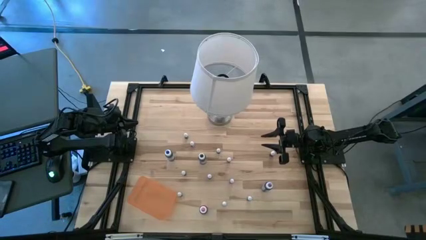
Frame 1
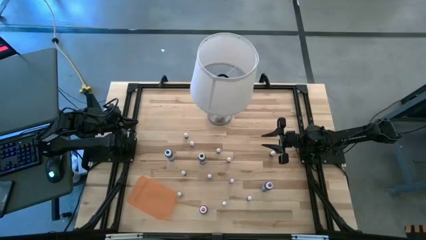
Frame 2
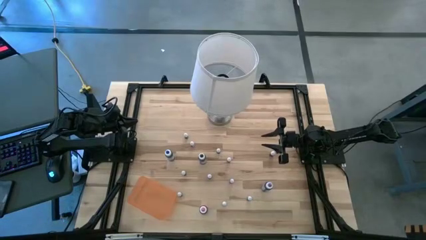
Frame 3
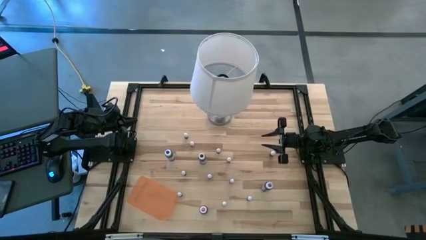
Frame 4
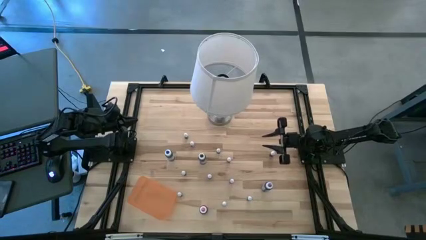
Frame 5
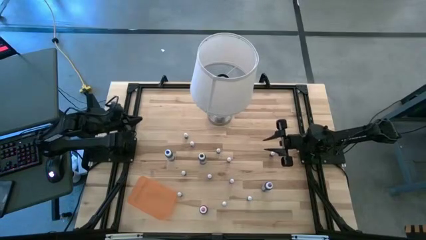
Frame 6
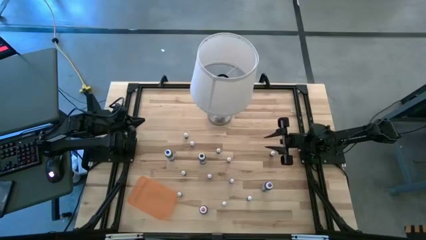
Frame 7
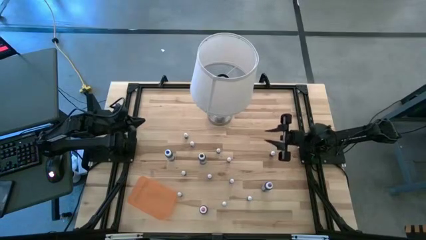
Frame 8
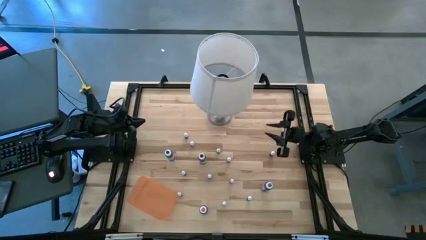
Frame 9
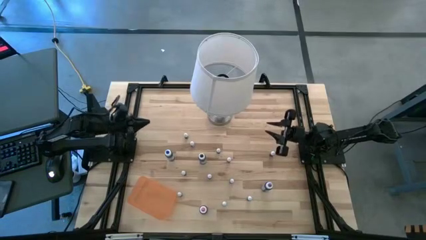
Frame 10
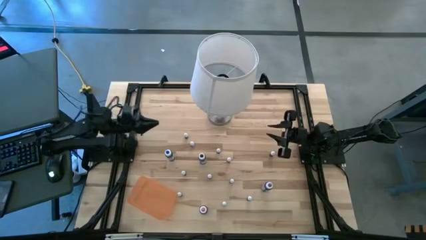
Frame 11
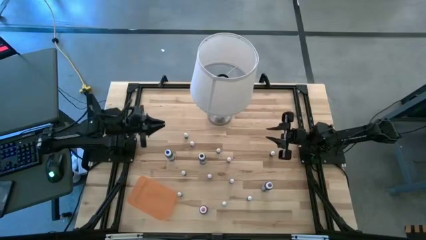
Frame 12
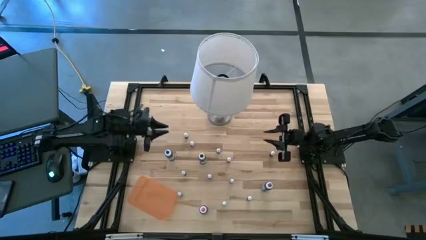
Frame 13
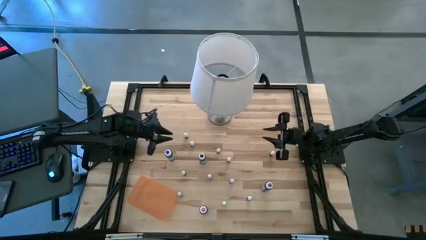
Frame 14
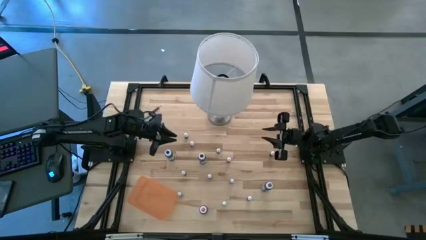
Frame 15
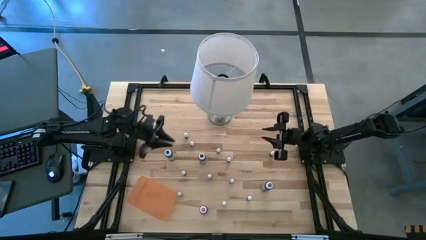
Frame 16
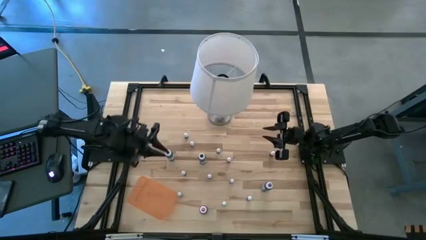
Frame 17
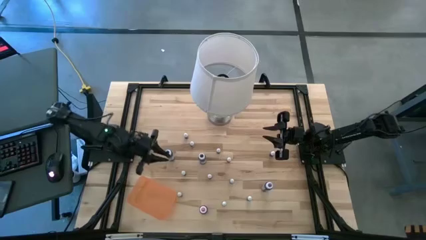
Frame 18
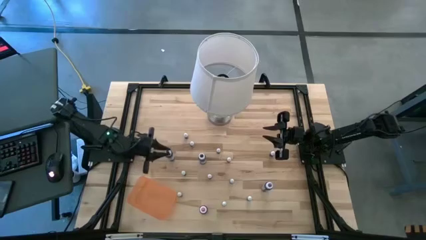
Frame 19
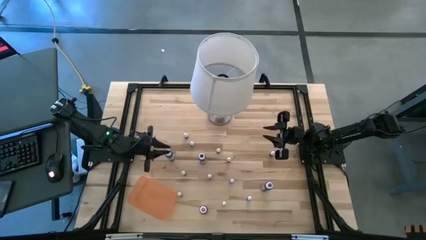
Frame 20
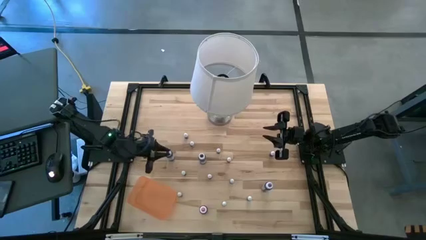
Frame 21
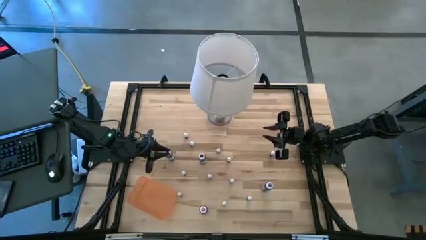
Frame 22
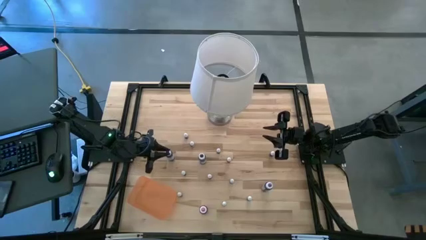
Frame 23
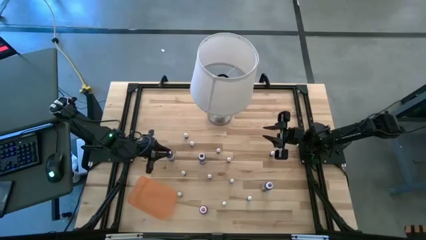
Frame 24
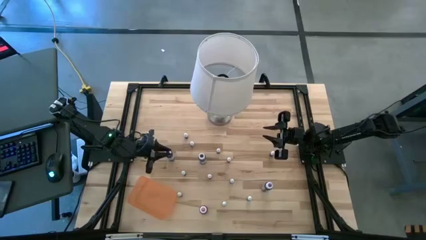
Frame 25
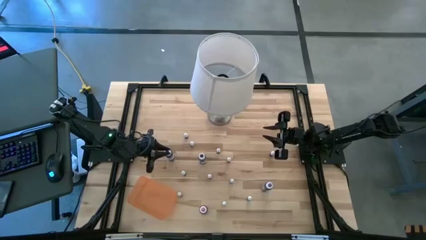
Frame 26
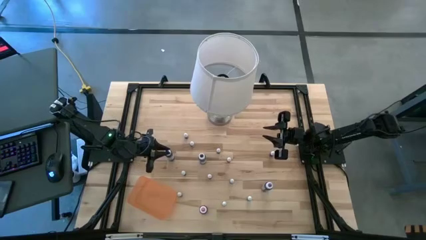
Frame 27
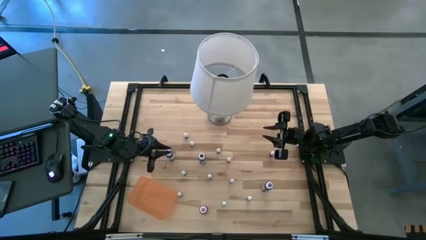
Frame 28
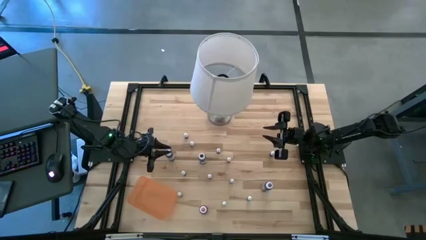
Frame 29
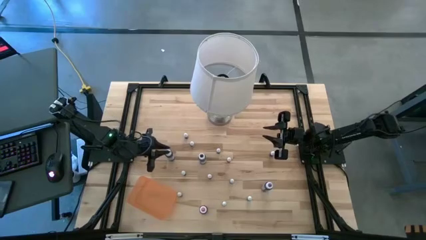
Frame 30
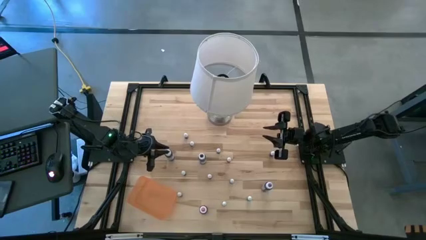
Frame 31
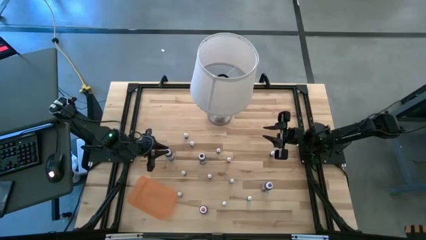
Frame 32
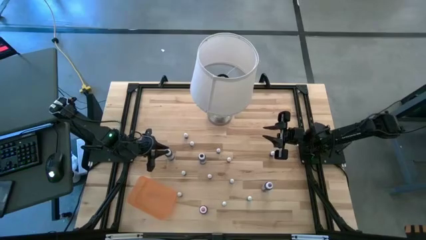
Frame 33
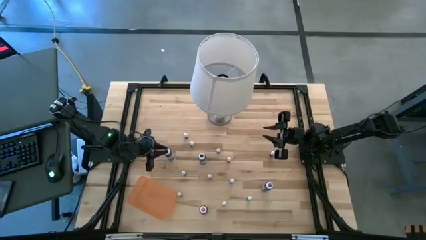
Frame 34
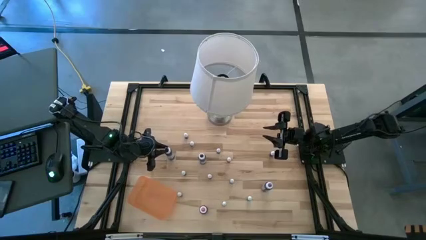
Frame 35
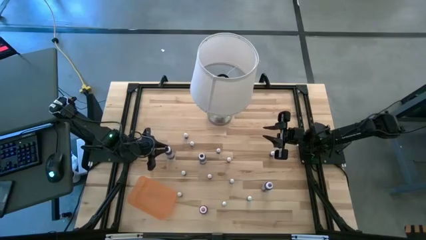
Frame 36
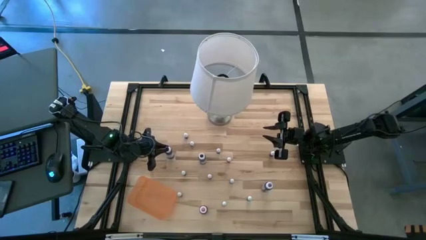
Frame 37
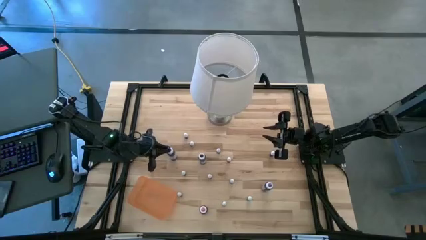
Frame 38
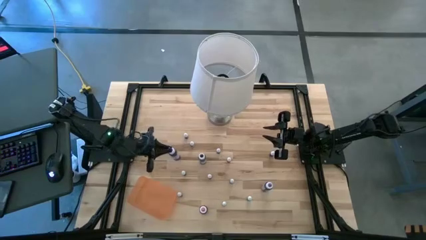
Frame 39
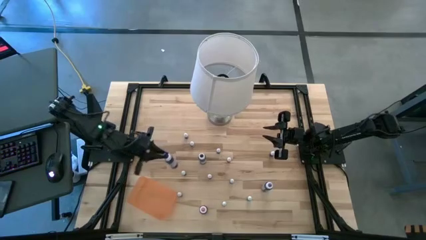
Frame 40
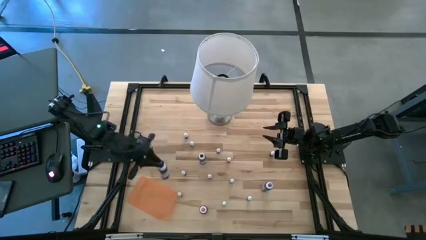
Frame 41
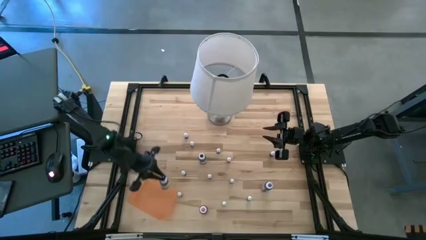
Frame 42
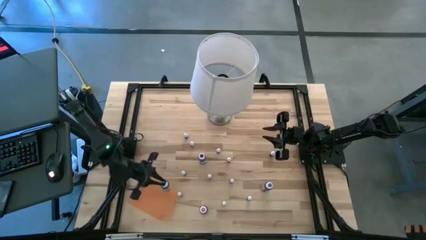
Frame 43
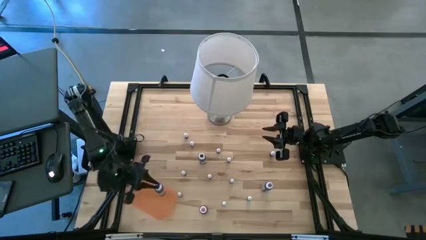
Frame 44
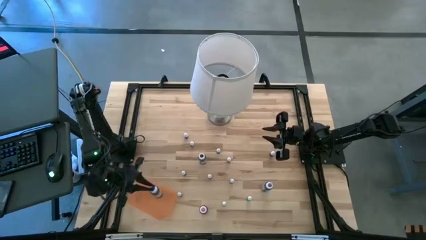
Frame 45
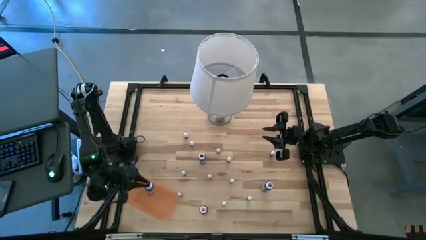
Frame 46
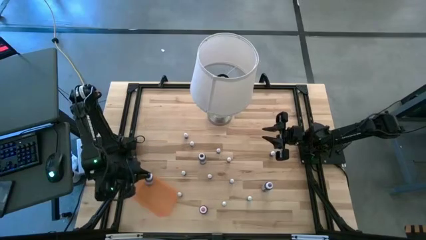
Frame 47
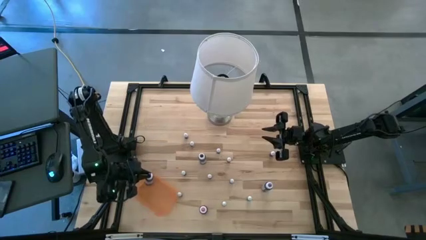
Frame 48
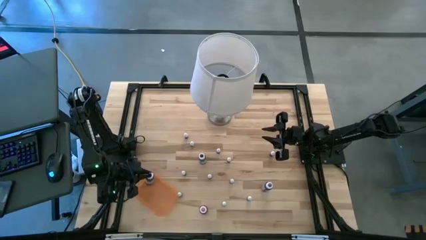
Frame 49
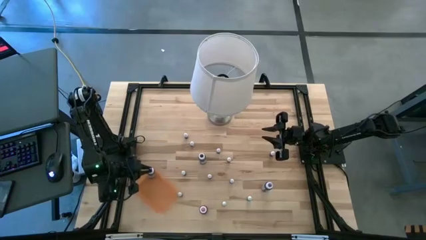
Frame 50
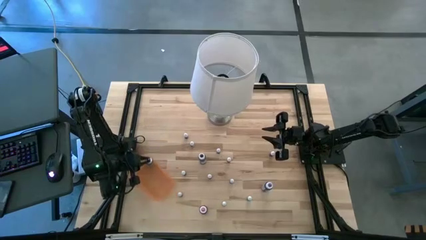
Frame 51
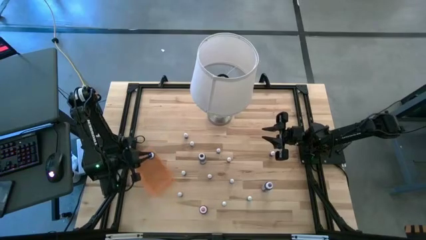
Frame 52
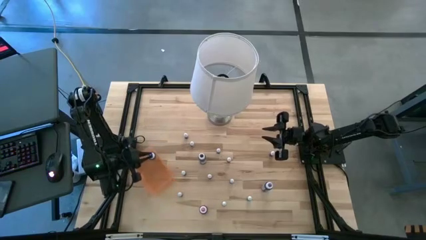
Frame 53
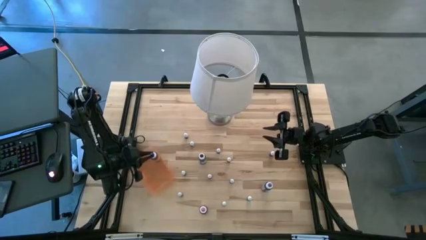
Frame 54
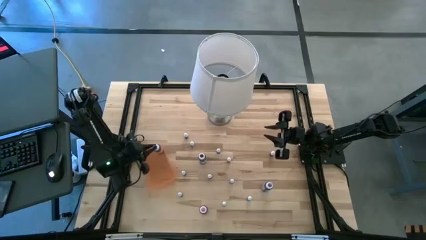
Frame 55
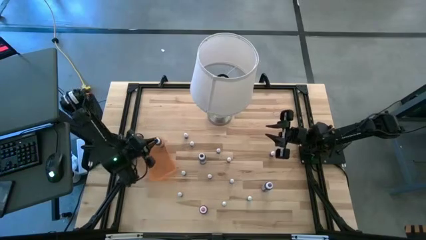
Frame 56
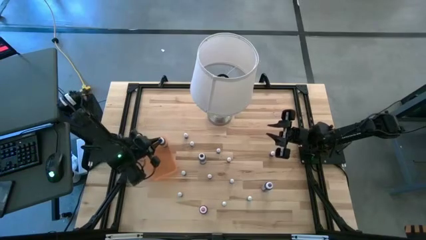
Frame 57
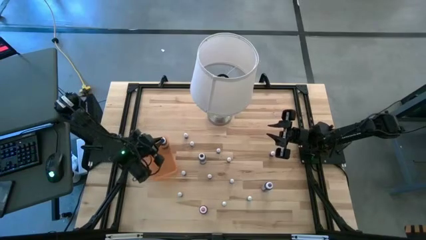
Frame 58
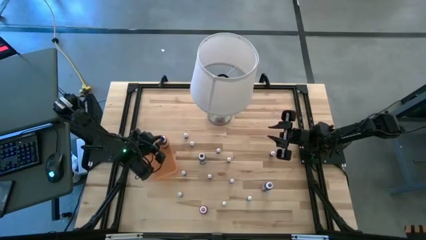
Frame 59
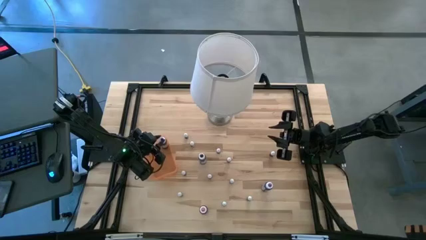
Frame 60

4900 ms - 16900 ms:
Task: Pick & Place food coloring
Put the big blue food coloring bottle into the orange bin

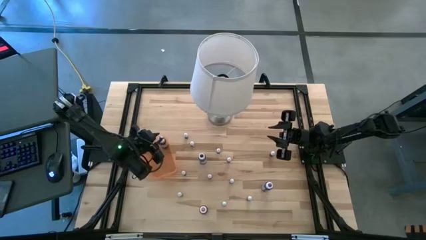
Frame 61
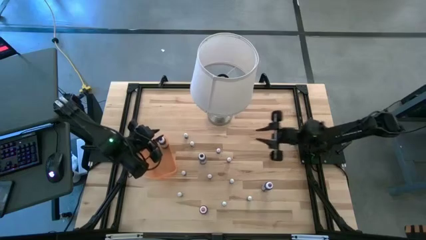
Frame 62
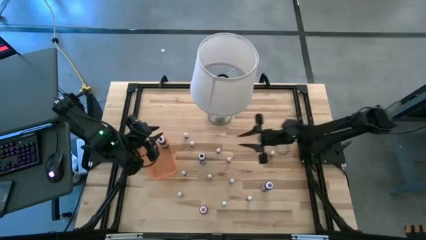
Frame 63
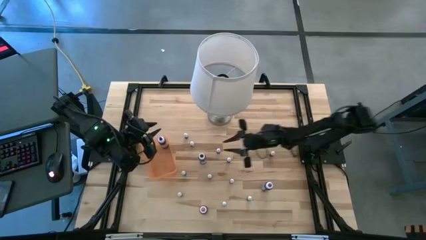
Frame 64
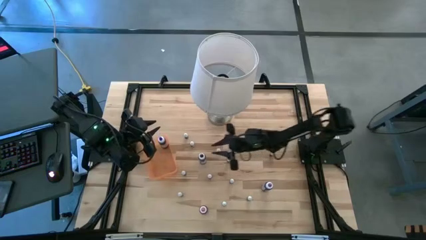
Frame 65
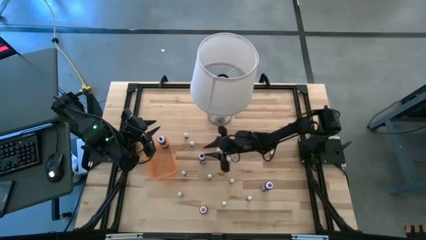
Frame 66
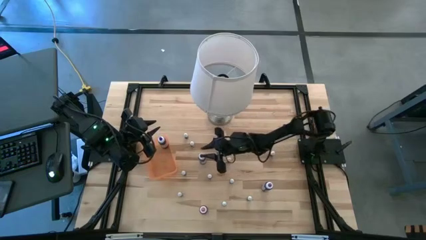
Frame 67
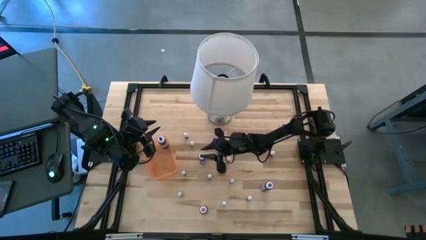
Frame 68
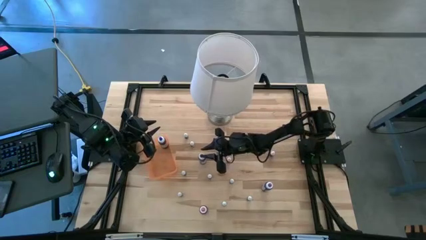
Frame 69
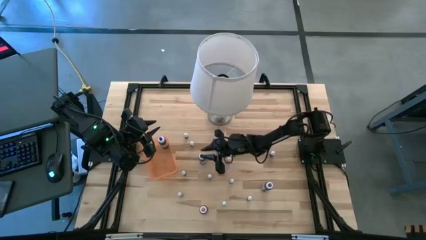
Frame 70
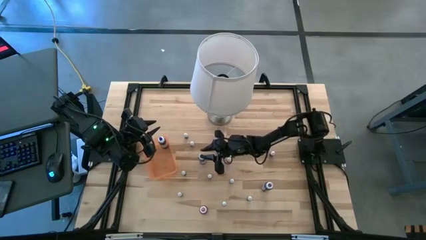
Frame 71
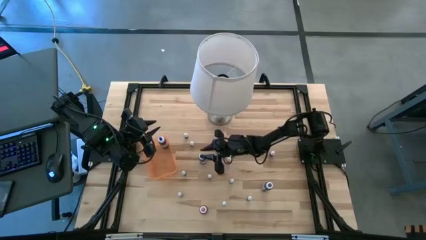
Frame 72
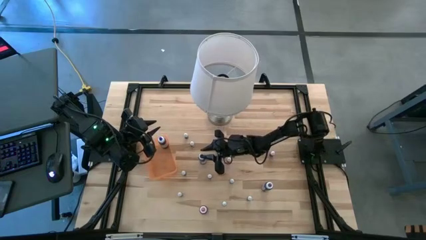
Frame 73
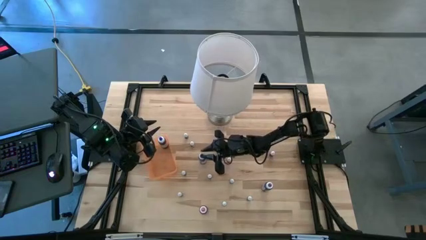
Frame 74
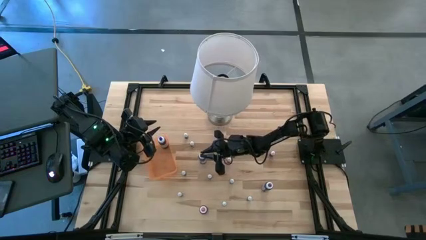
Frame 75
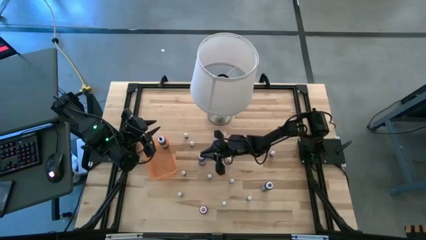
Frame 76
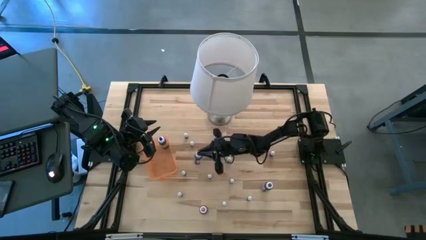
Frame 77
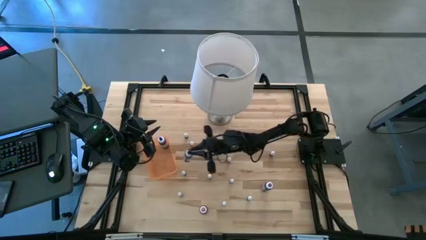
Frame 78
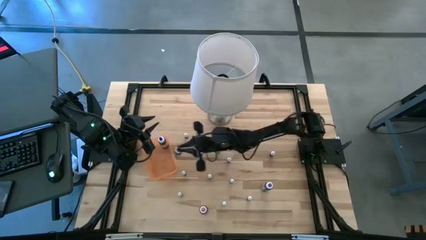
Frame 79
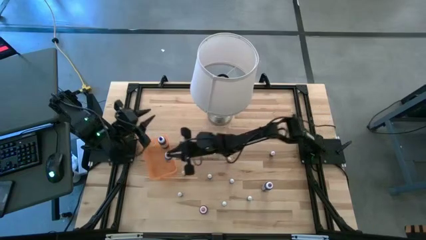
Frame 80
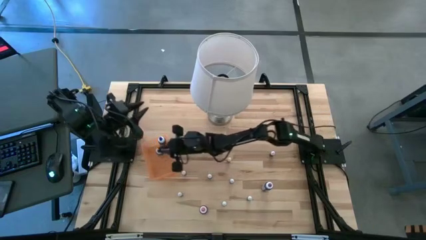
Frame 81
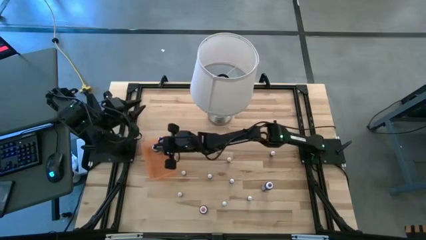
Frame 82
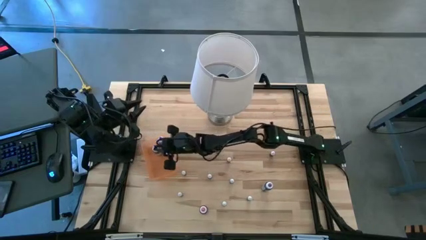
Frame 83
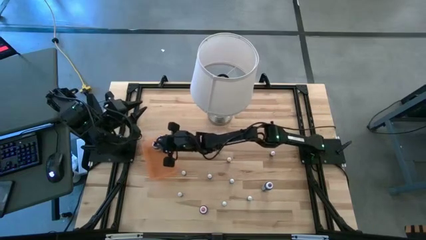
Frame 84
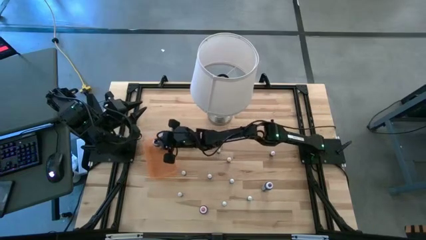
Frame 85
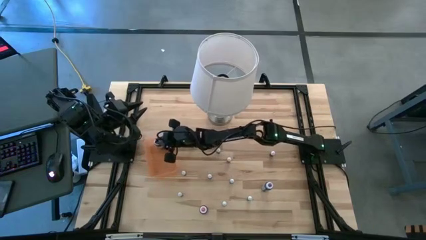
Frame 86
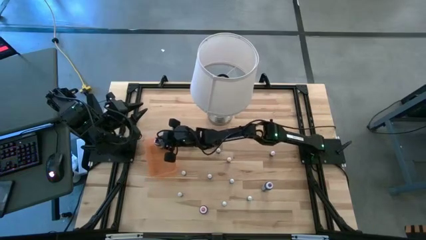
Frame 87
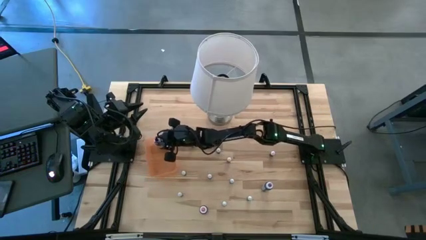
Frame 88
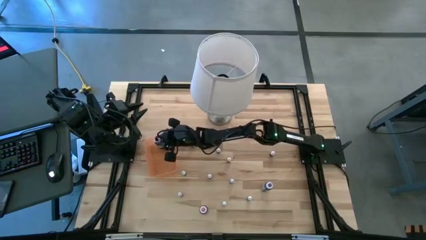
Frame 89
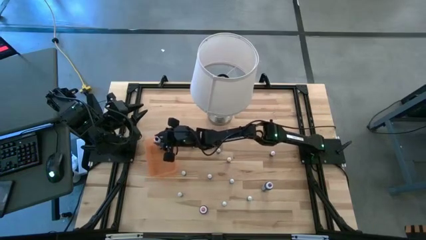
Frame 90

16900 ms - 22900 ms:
Put the big black food coloring bottle into the orange bin
